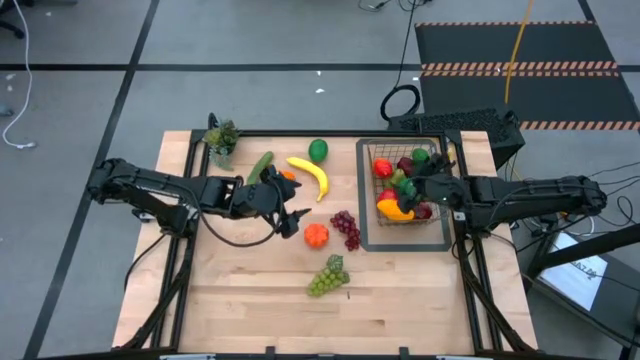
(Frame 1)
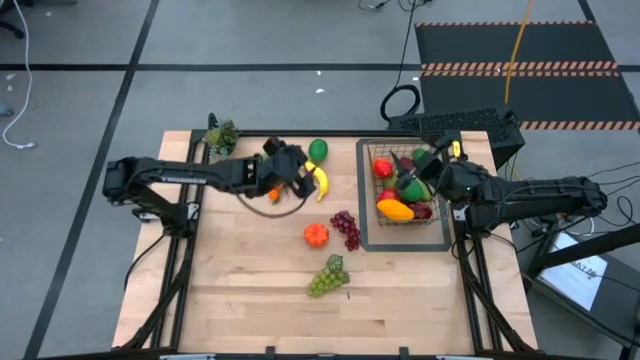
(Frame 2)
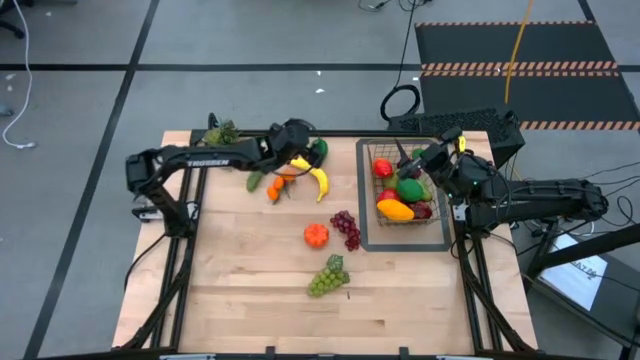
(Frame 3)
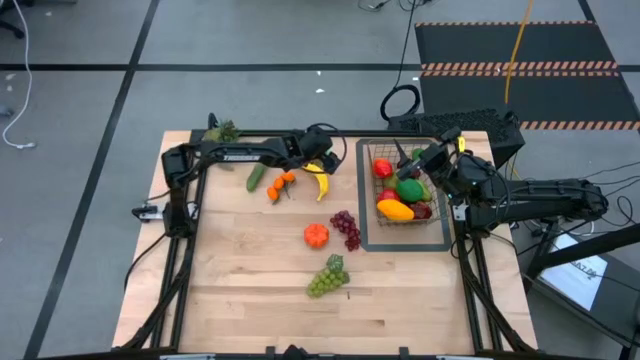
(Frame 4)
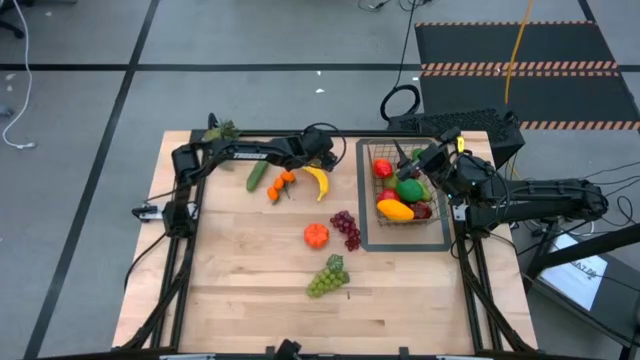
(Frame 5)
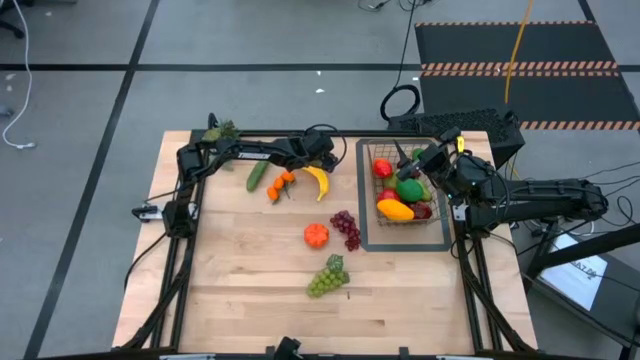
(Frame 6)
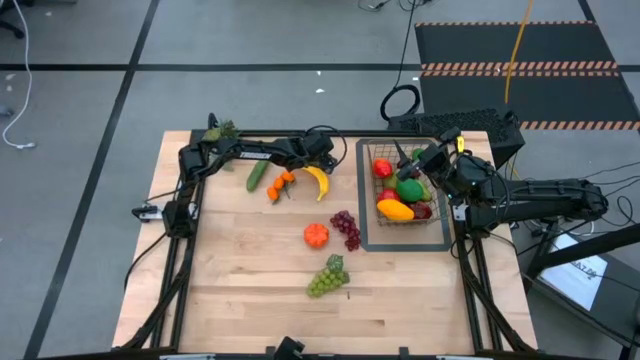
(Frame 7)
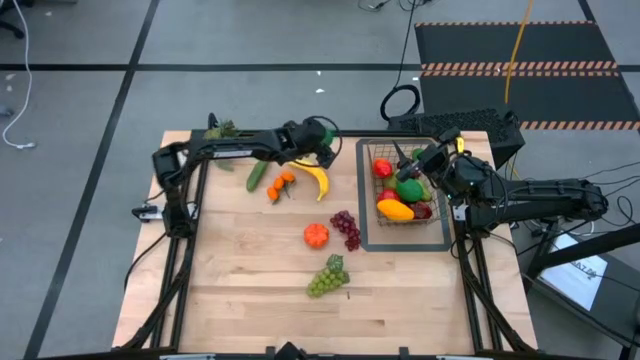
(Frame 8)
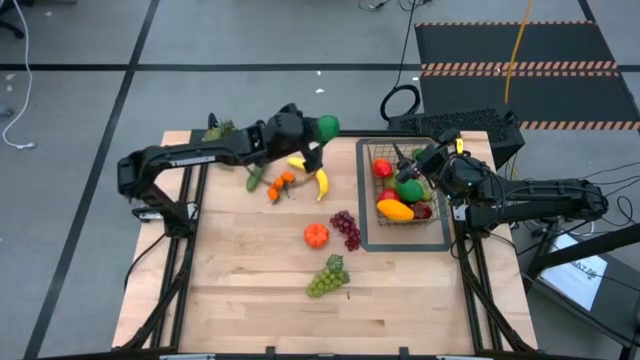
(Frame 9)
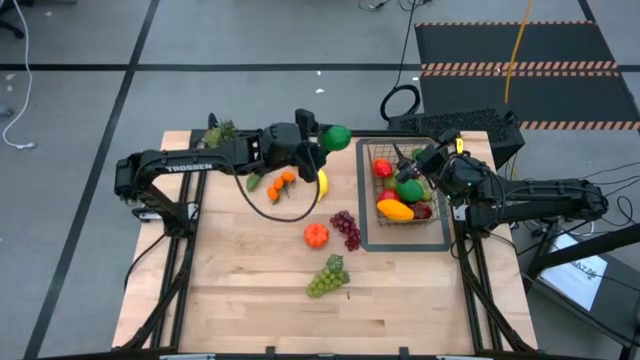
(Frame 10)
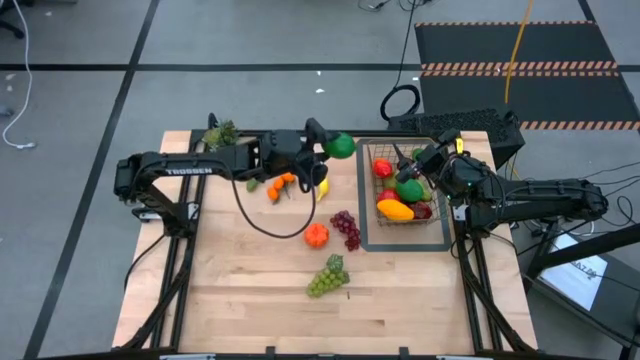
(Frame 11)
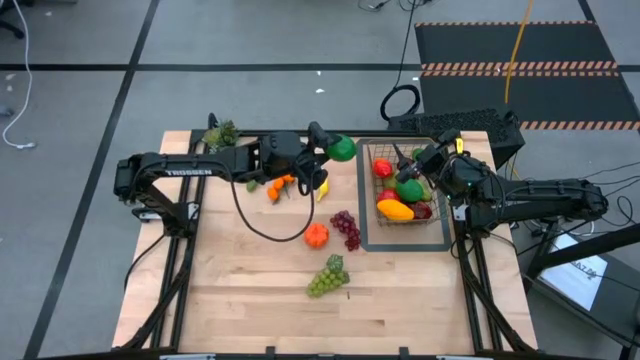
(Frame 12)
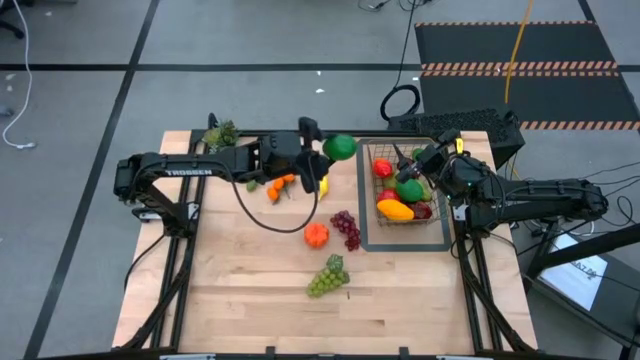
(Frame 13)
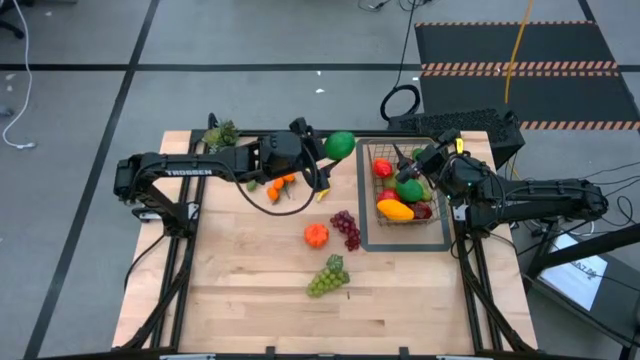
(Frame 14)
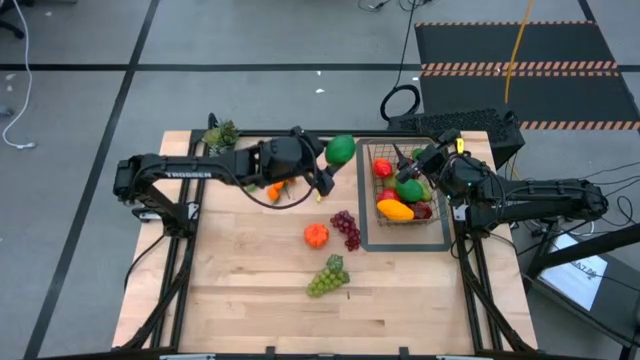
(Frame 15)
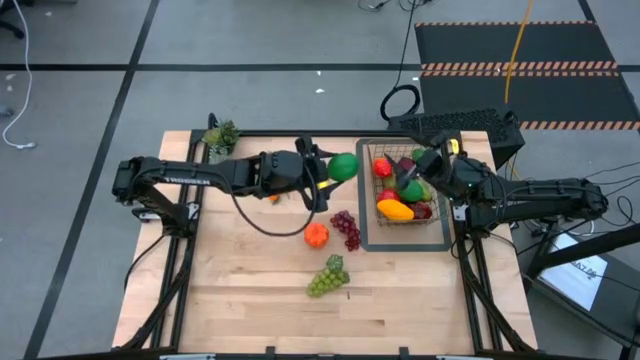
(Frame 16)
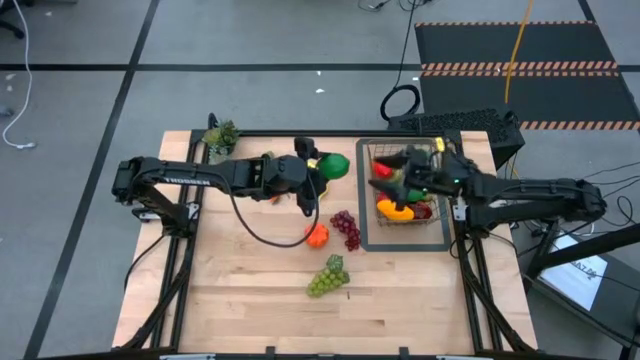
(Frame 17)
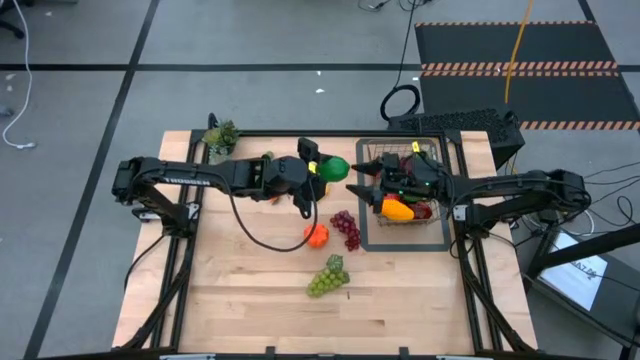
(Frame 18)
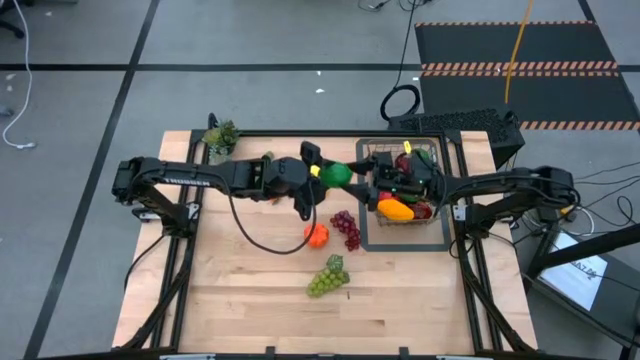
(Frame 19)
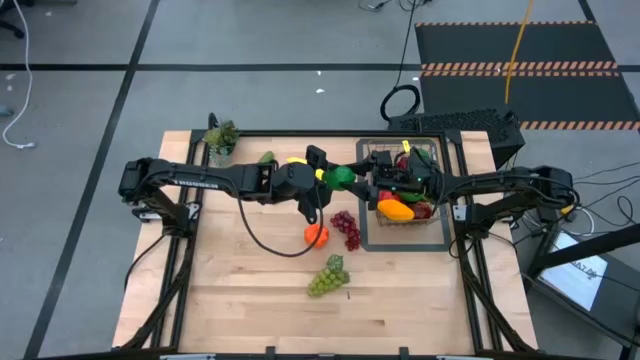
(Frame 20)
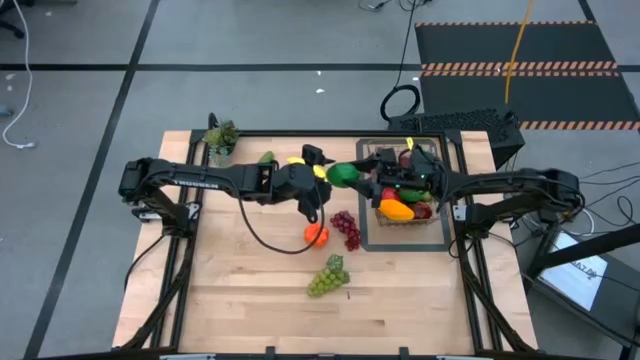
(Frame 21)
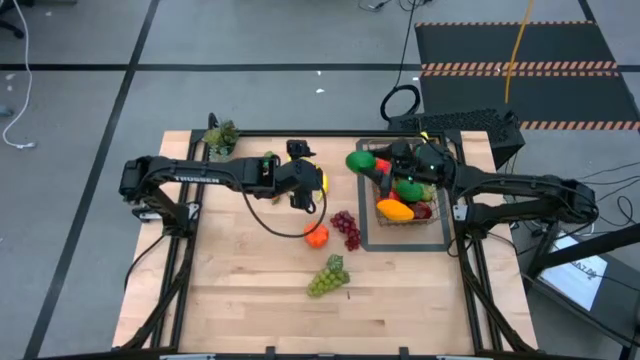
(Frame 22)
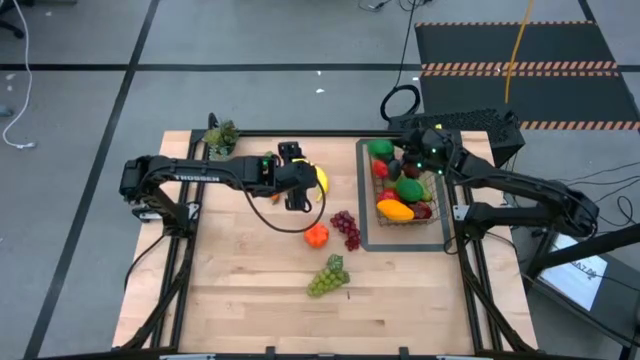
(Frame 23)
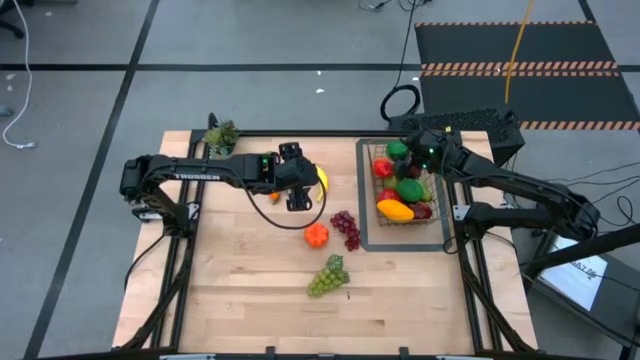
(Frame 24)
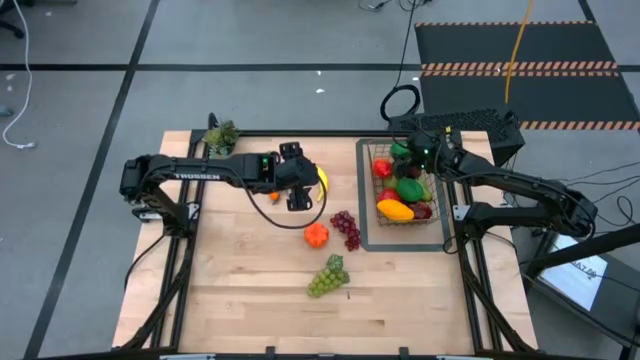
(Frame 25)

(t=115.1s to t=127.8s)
Task: Build produce basket
Put the lime into the gold wire basket

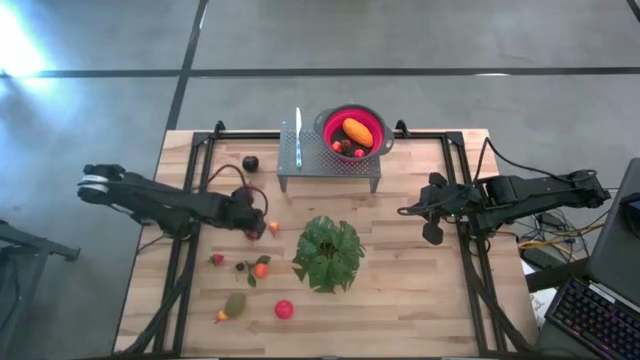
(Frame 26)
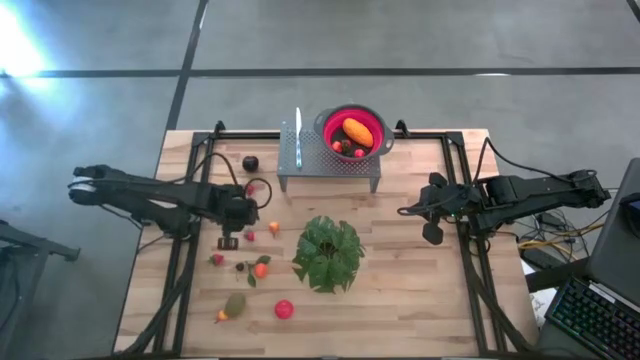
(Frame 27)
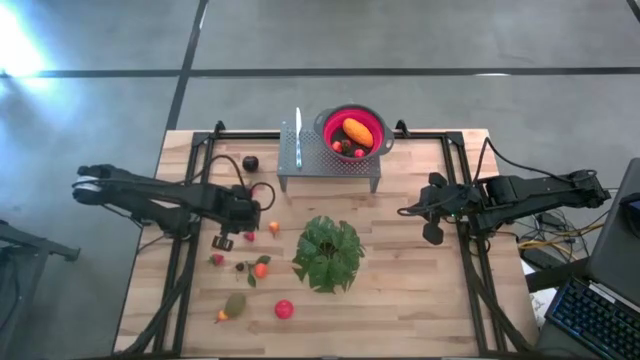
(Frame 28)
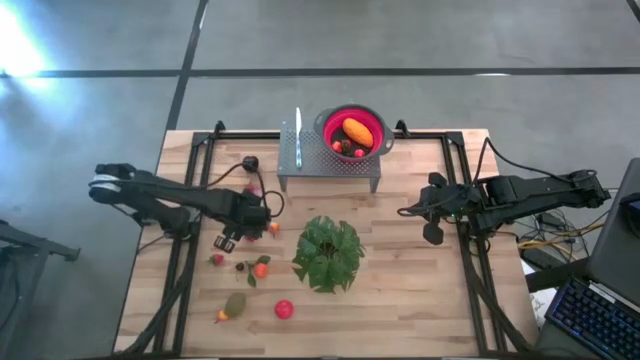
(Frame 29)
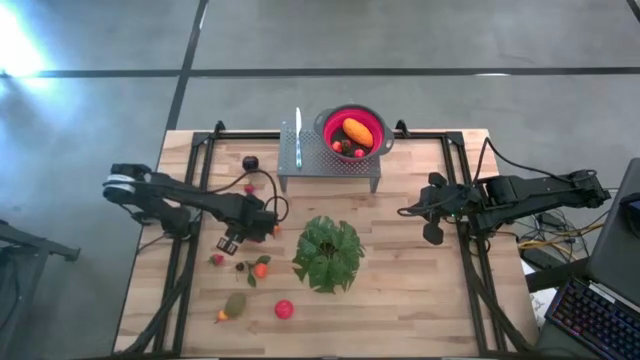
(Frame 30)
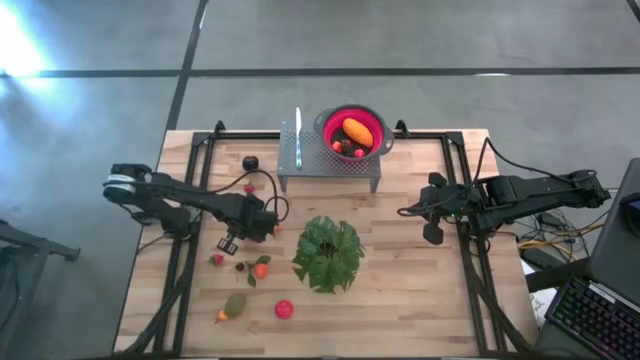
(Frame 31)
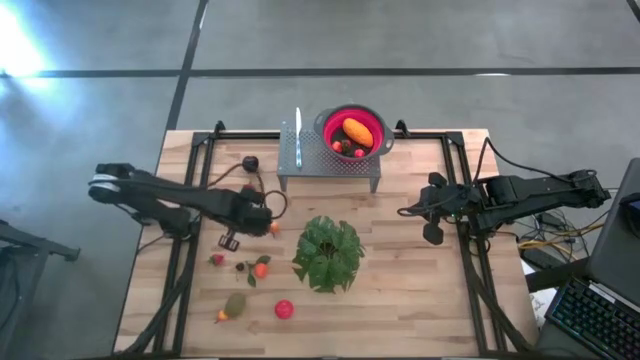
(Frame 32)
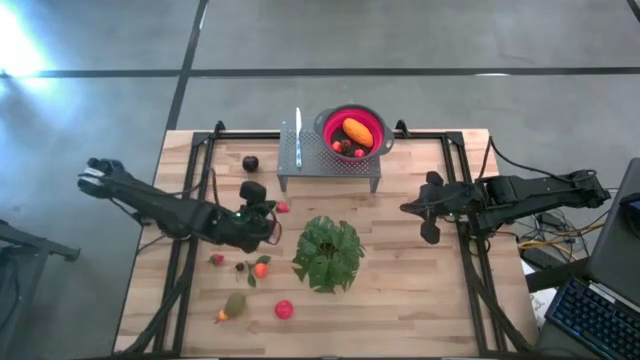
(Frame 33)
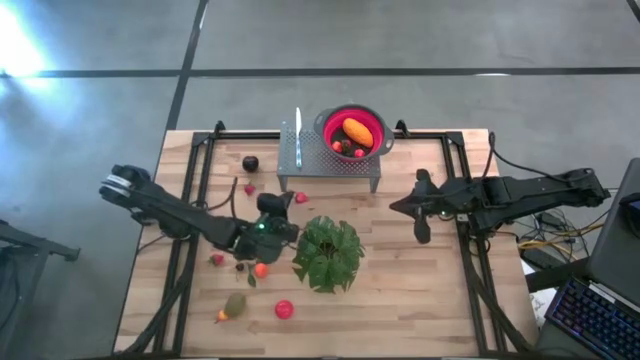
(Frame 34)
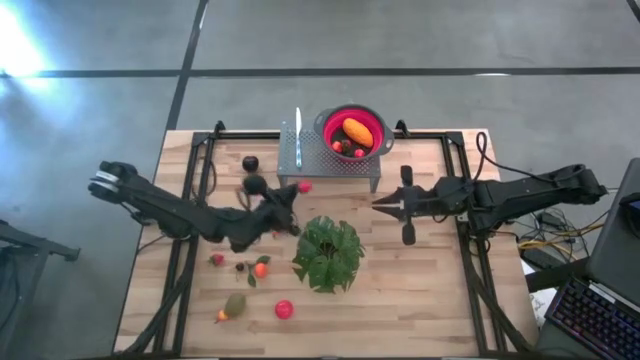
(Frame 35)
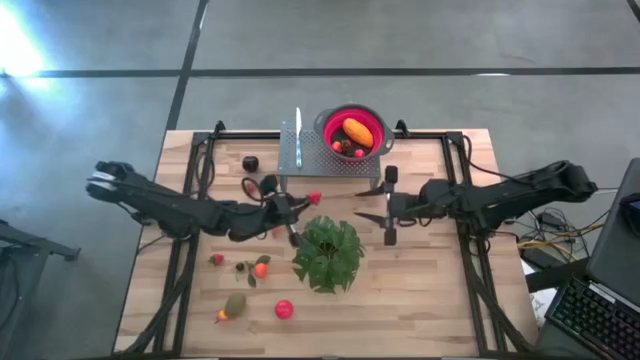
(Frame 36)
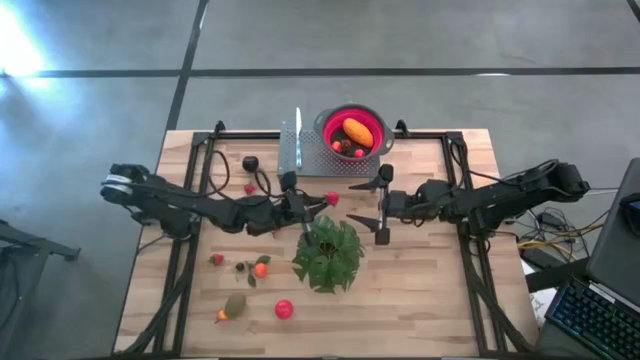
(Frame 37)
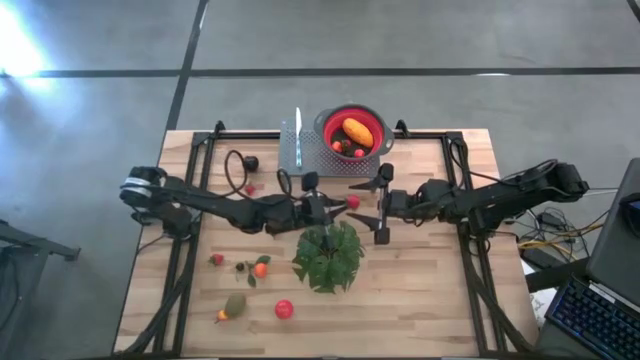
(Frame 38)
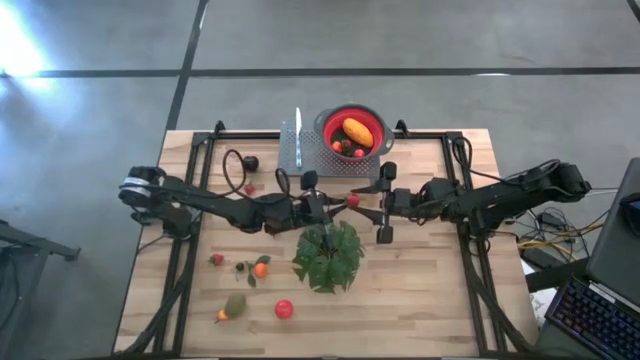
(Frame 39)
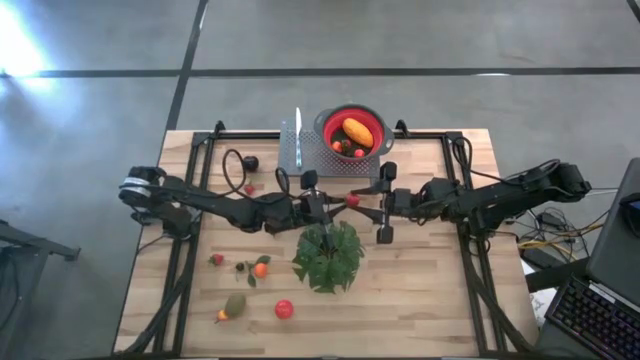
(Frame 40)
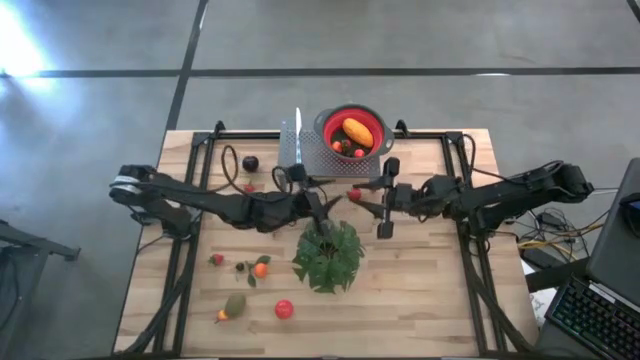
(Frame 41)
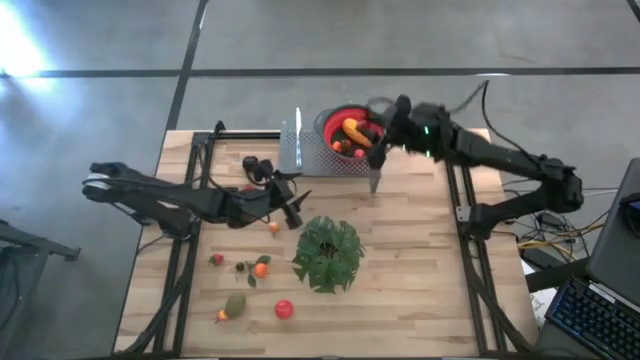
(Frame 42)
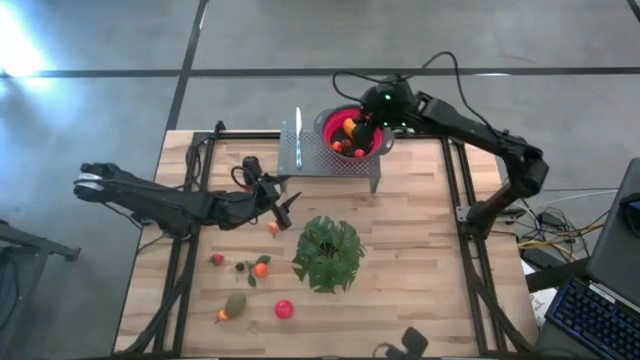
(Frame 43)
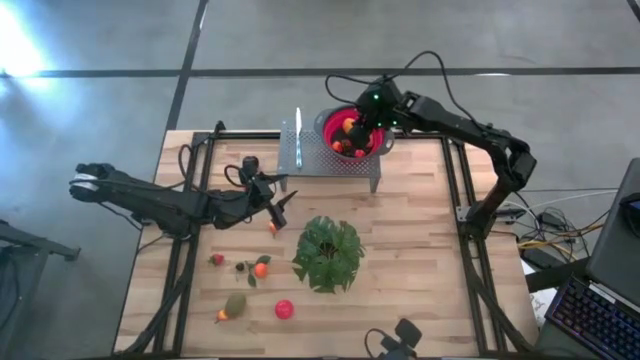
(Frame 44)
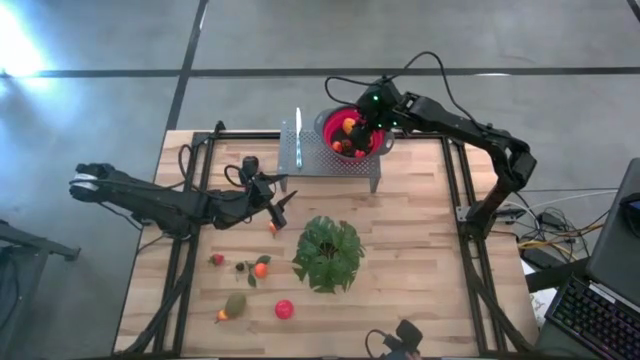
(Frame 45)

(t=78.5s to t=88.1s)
Task: Pick & Place Fruit
Put the red strawberry into the red strainer bowl on the shelf
